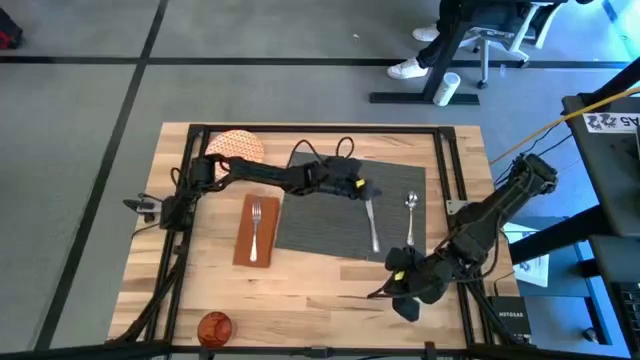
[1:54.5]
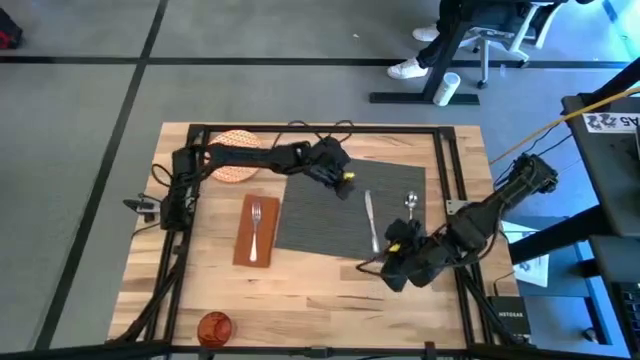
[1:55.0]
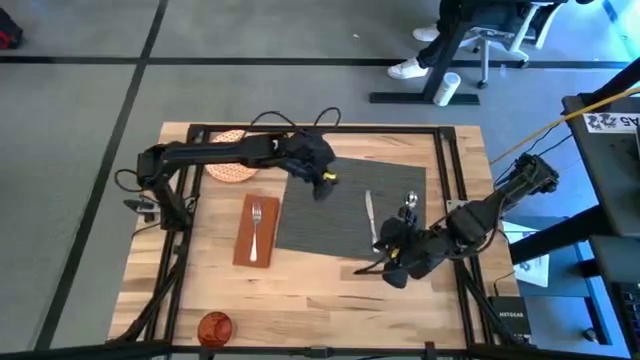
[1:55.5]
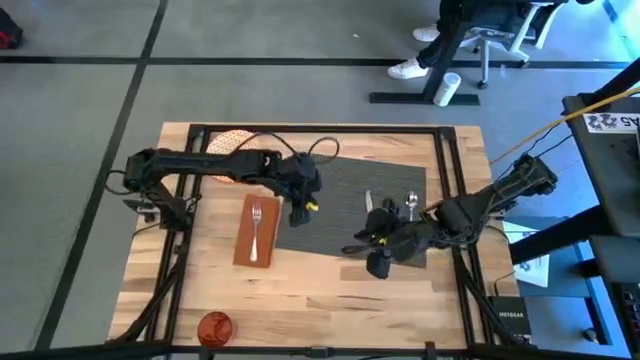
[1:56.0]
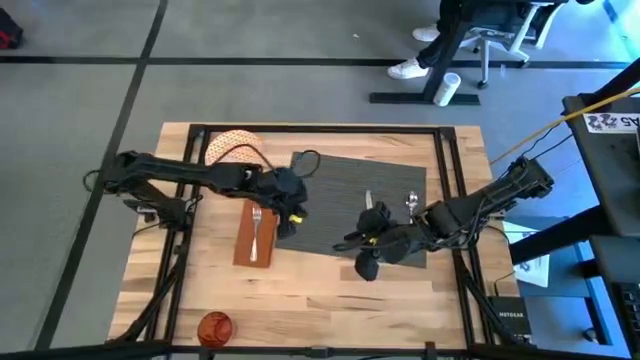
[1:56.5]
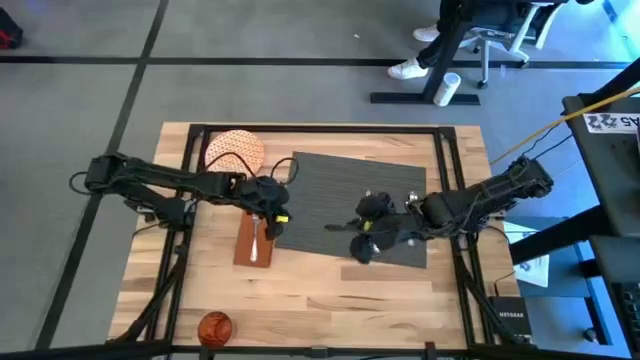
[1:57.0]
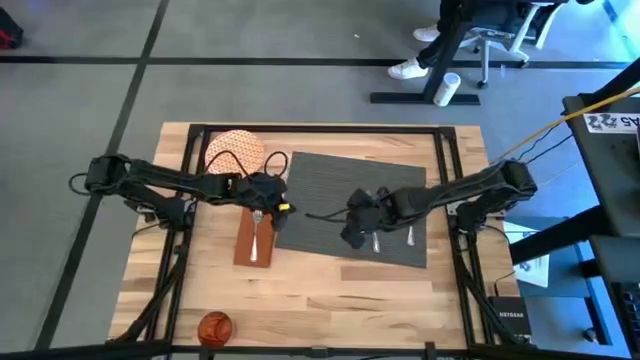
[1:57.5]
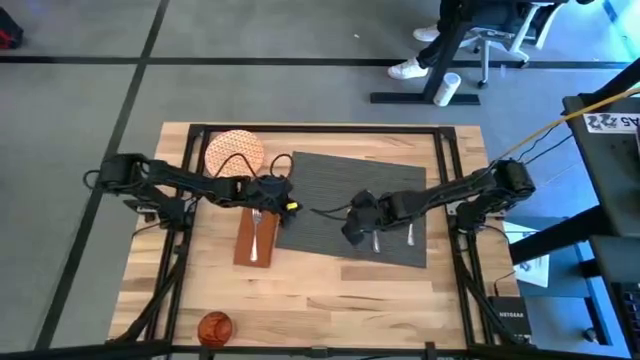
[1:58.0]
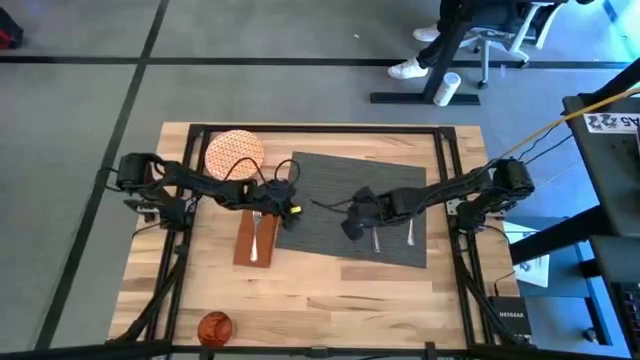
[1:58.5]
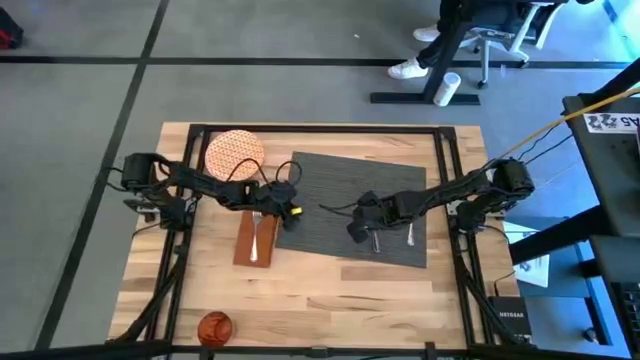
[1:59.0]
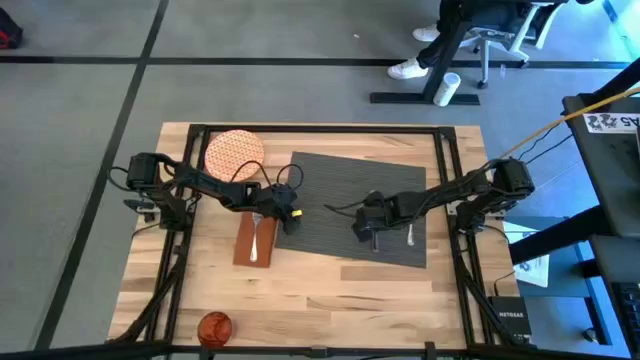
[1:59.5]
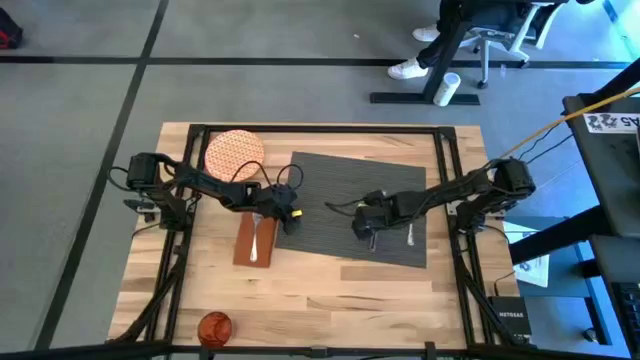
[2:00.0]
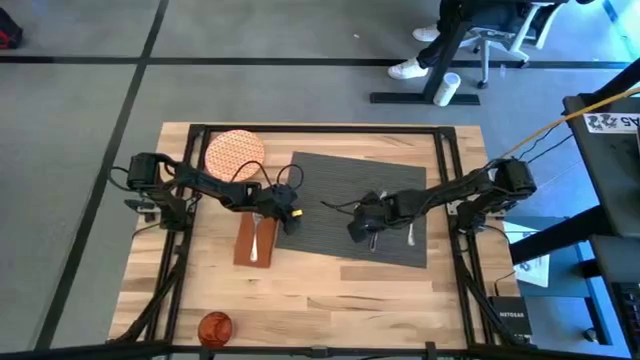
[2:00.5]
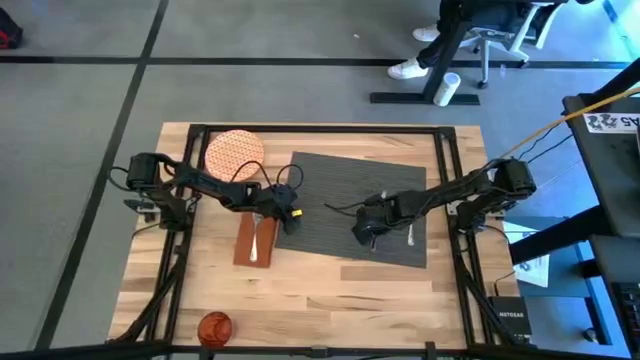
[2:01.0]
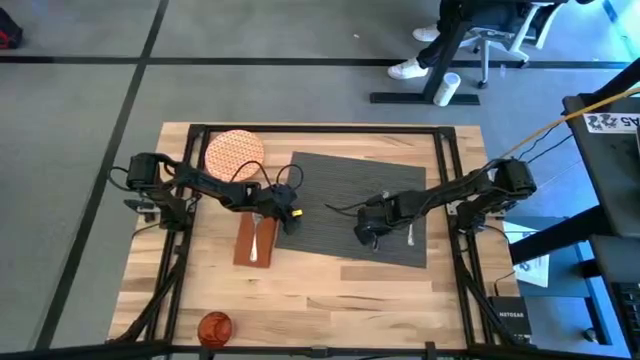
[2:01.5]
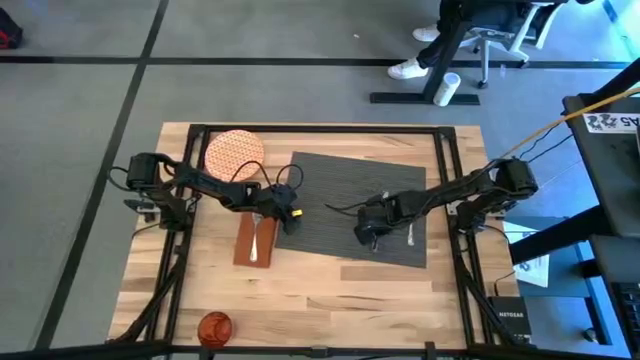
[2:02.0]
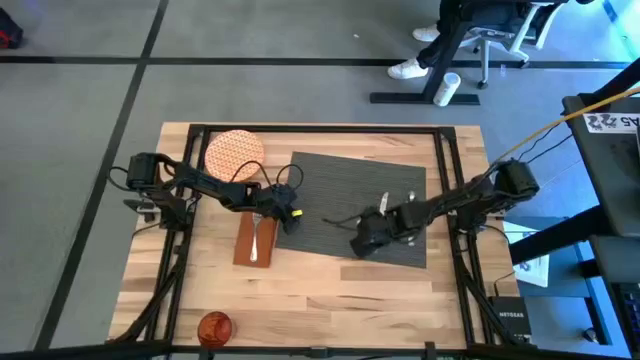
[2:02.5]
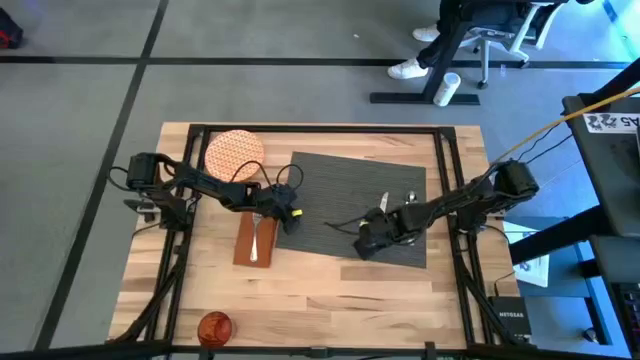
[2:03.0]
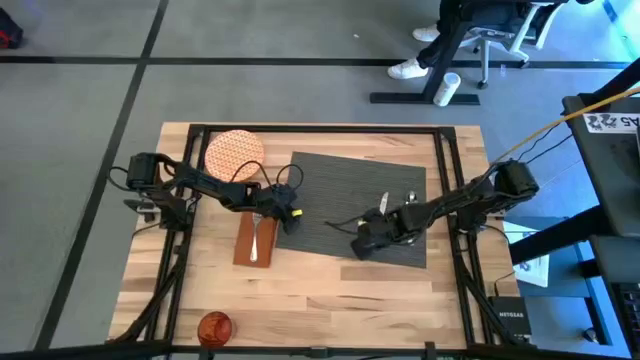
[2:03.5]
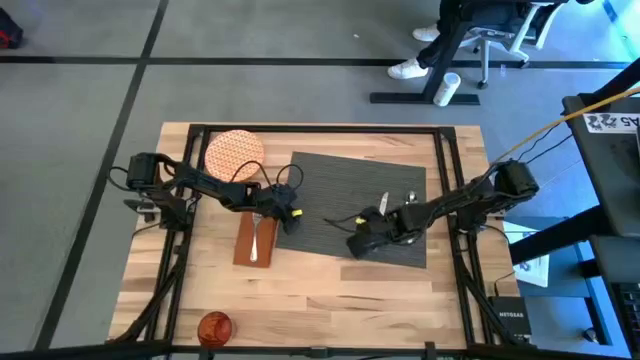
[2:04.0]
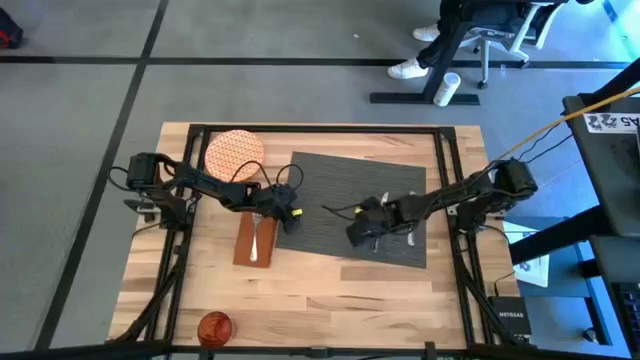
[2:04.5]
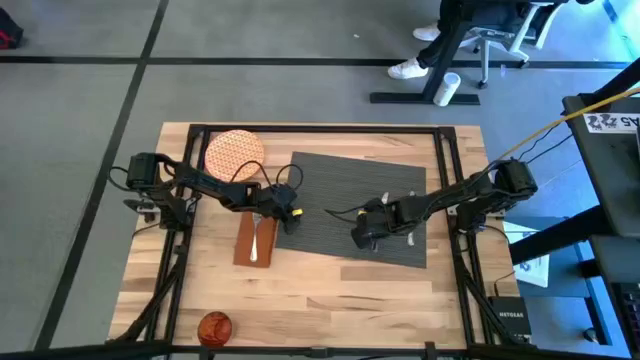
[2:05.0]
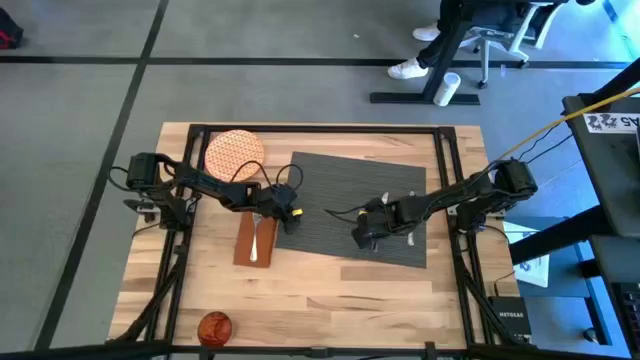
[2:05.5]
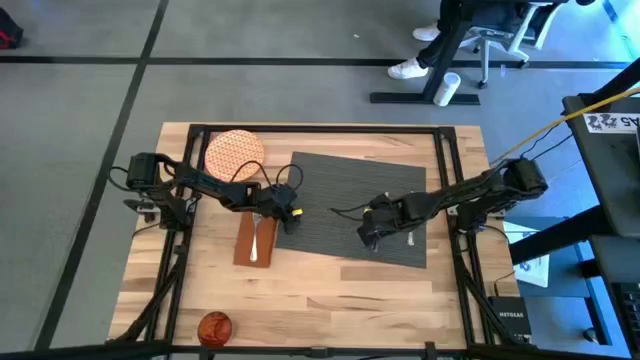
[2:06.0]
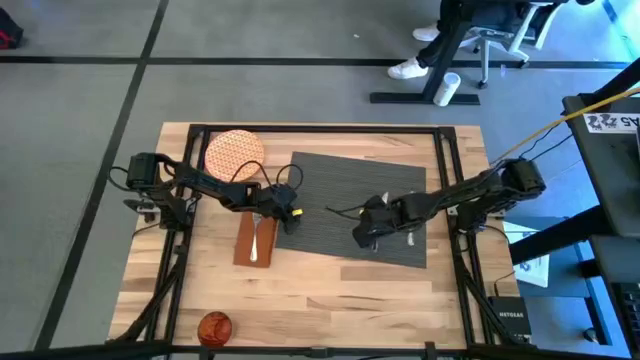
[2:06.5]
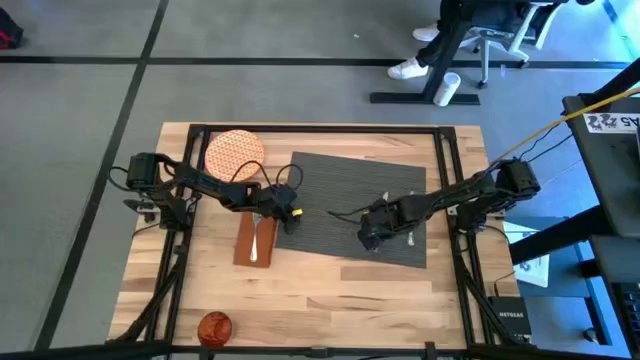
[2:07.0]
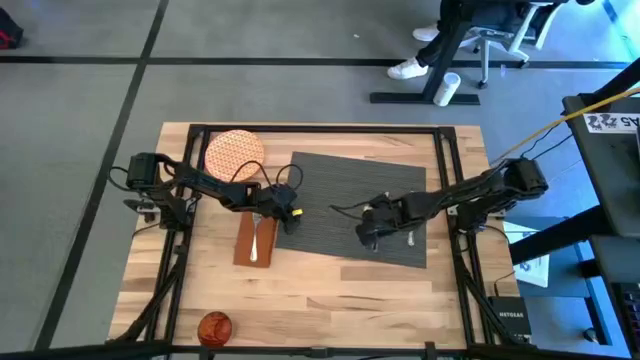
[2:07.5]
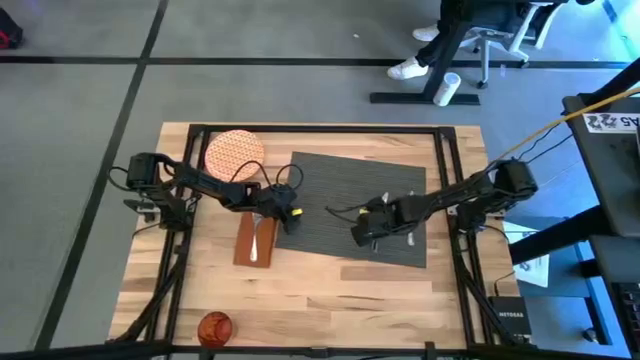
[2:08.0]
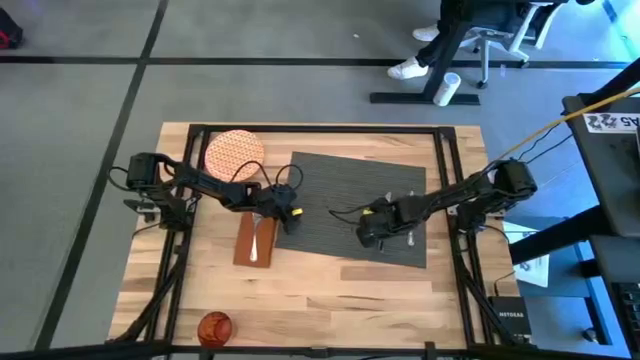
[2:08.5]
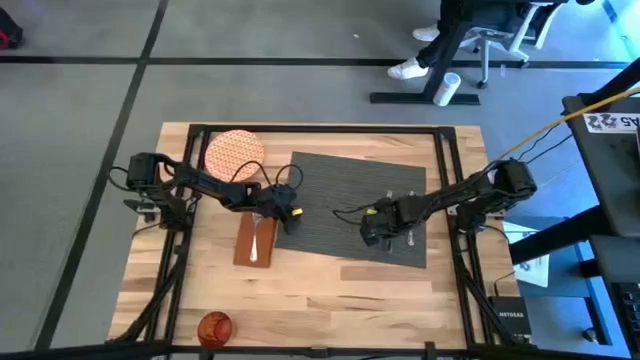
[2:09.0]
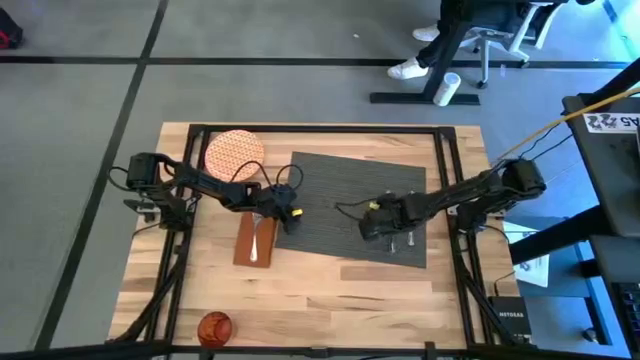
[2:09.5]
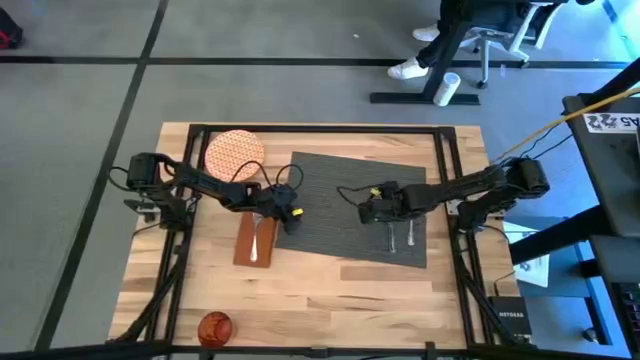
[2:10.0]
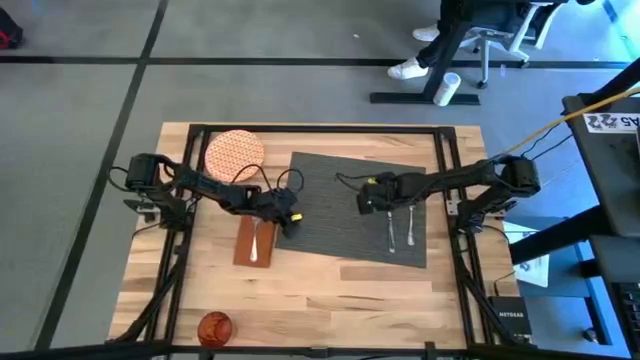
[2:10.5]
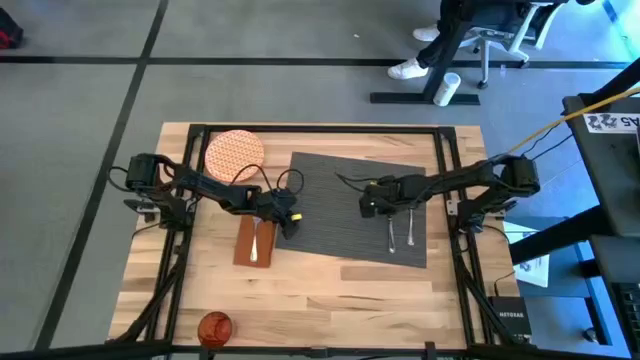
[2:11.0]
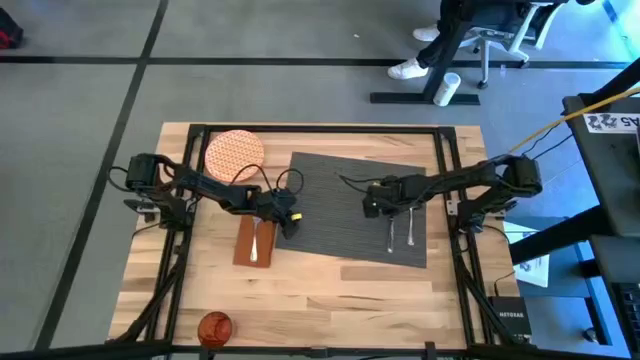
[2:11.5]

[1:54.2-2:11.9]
Task: Set table place
Put the silver table knife on the gray tablemat to the left of the silver spoon

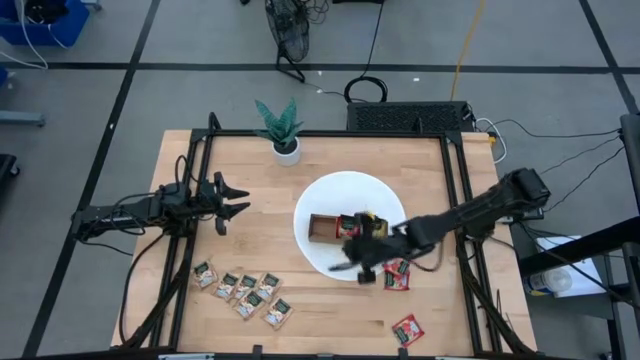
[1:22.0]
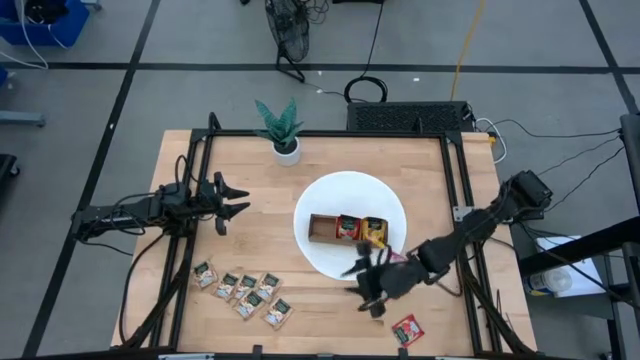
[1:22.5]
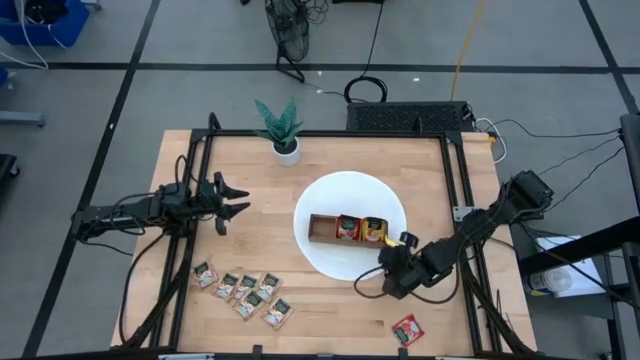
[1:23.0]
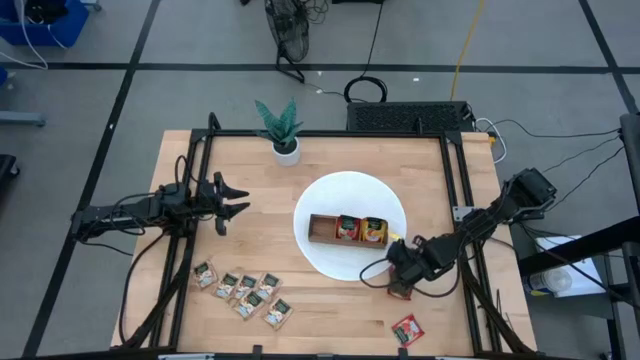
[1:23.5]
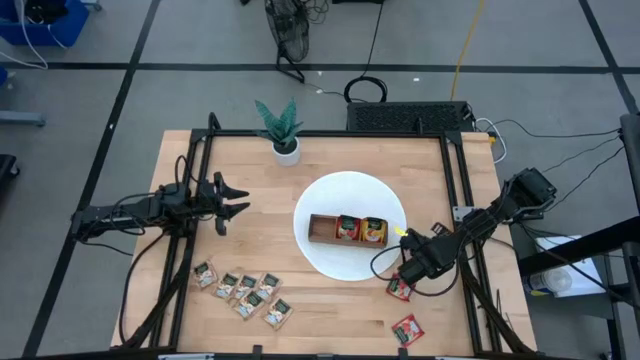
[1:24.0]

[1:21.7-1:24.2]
Task: Pick & Place Tea
Put the red tea bag into the middle section of the wooden organizer
